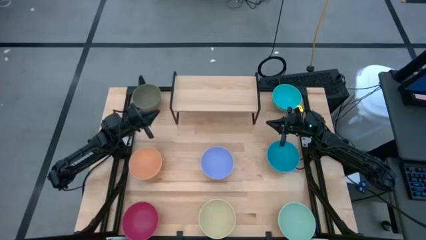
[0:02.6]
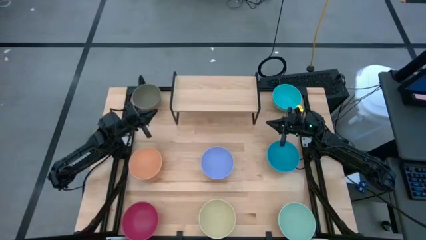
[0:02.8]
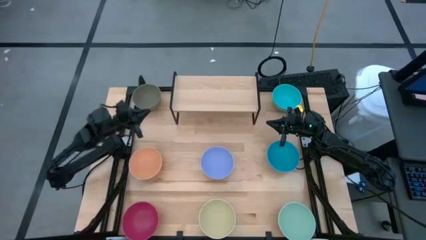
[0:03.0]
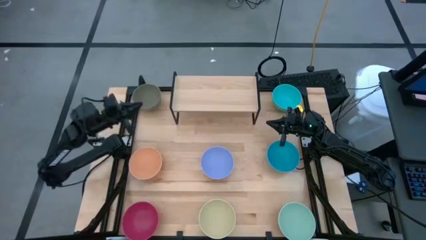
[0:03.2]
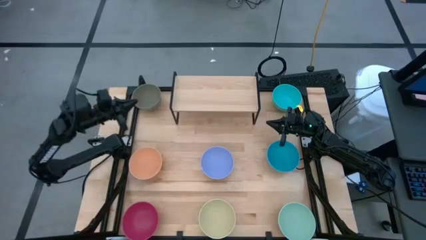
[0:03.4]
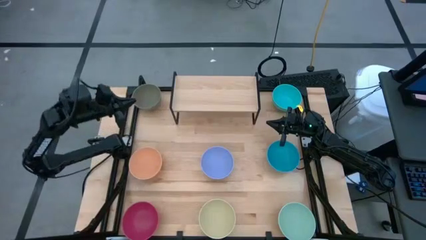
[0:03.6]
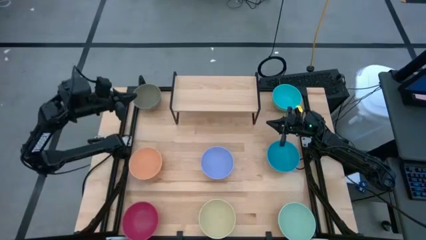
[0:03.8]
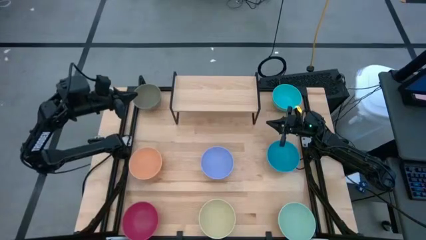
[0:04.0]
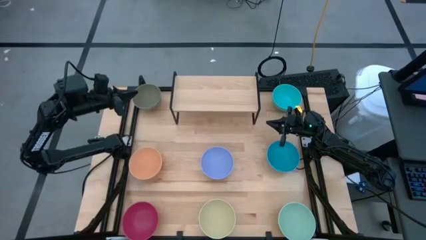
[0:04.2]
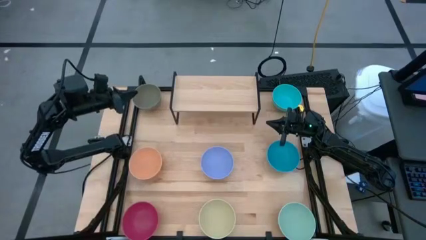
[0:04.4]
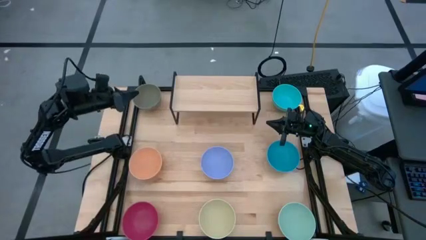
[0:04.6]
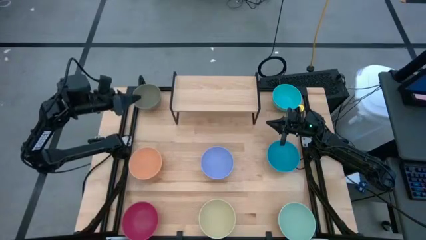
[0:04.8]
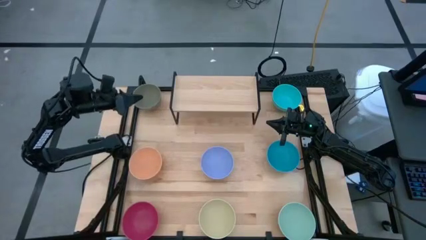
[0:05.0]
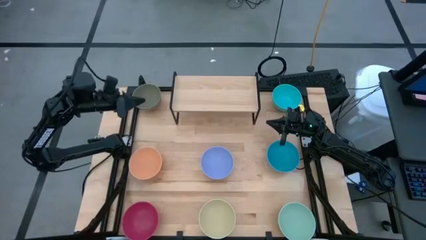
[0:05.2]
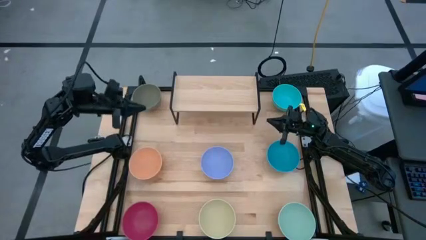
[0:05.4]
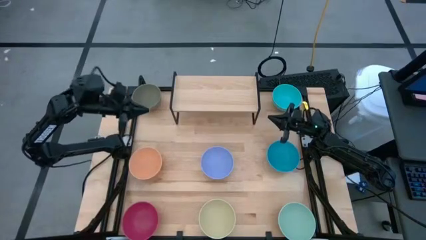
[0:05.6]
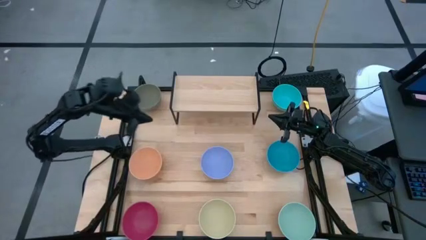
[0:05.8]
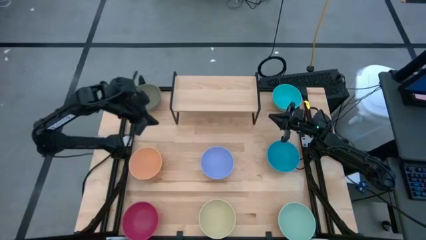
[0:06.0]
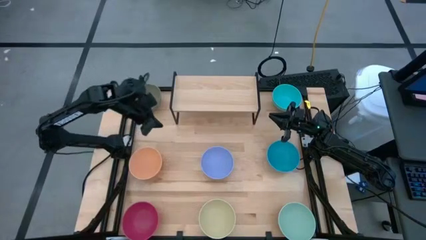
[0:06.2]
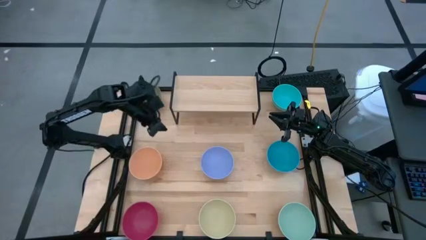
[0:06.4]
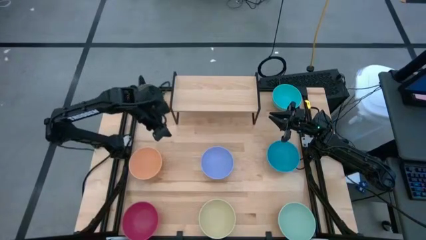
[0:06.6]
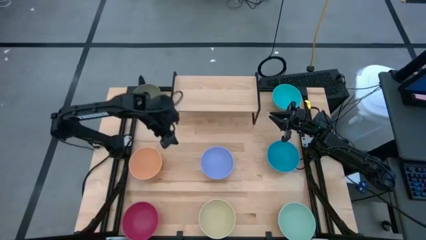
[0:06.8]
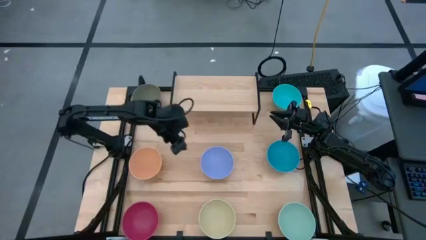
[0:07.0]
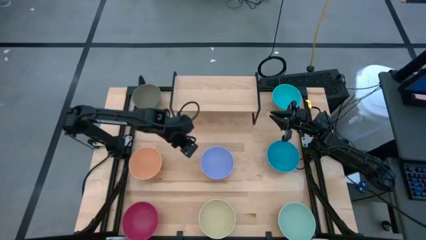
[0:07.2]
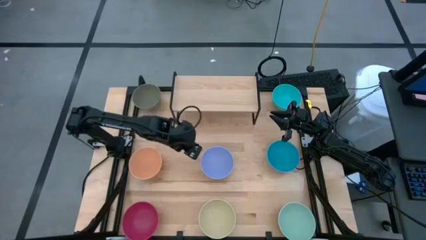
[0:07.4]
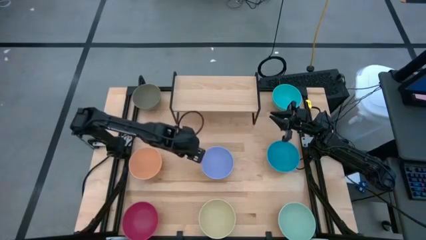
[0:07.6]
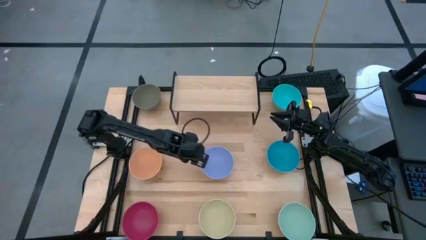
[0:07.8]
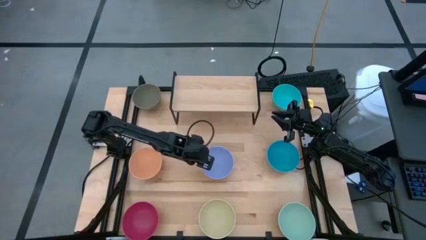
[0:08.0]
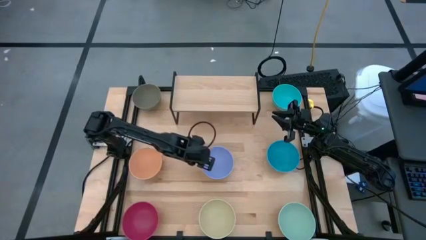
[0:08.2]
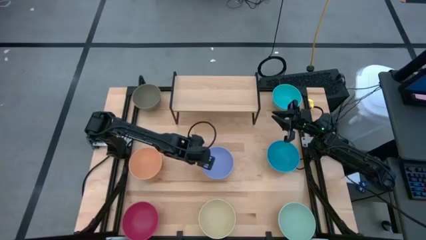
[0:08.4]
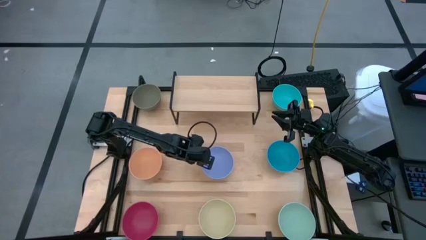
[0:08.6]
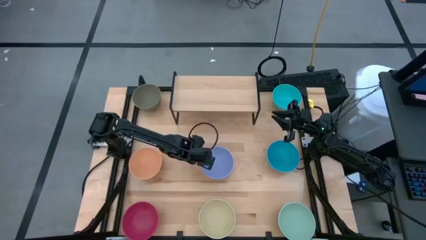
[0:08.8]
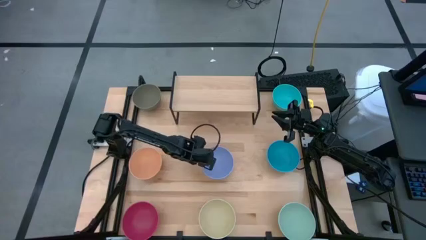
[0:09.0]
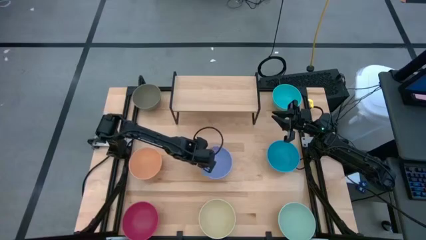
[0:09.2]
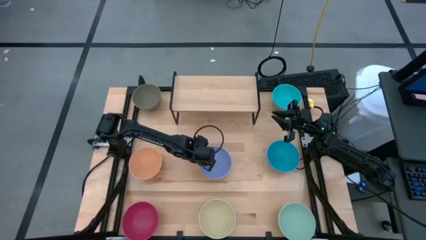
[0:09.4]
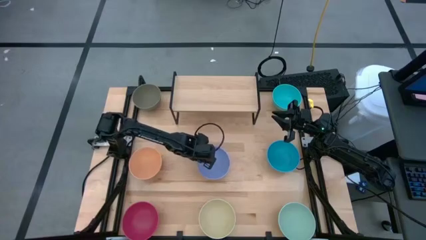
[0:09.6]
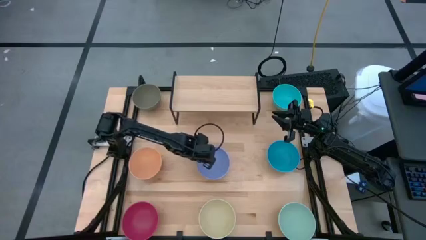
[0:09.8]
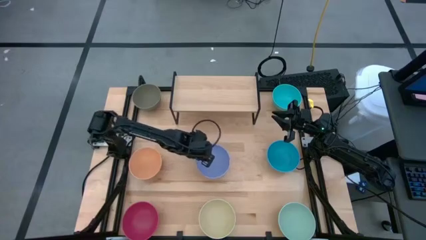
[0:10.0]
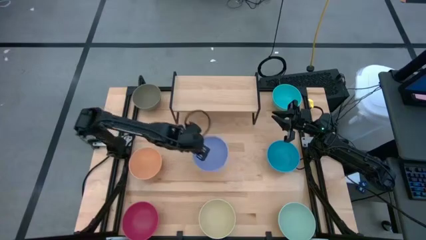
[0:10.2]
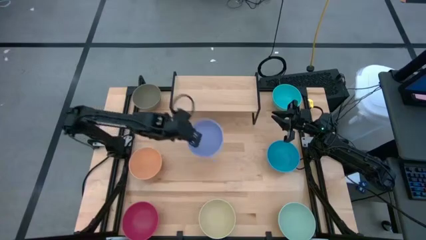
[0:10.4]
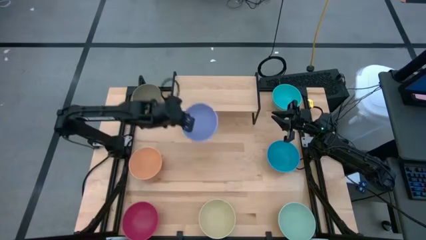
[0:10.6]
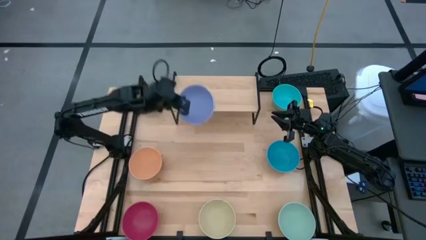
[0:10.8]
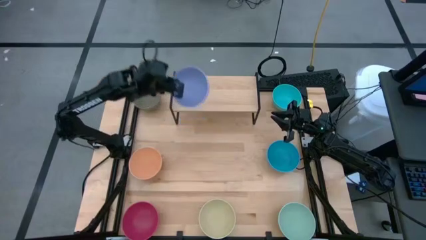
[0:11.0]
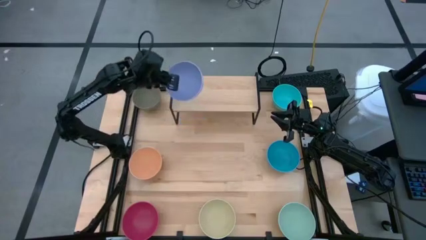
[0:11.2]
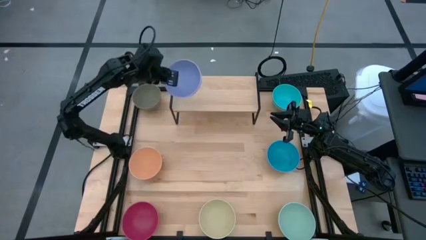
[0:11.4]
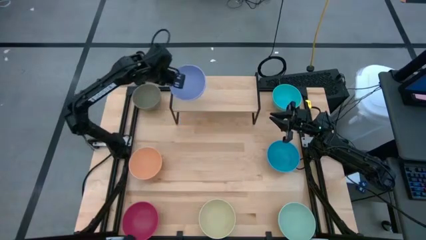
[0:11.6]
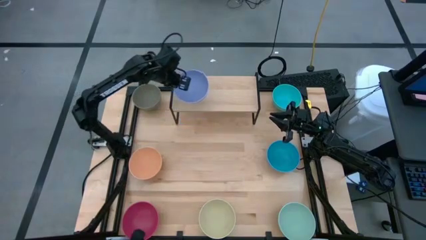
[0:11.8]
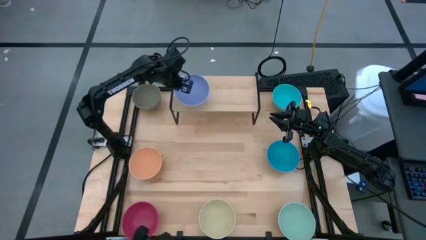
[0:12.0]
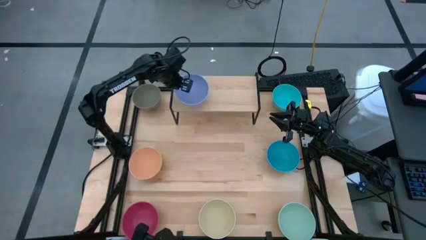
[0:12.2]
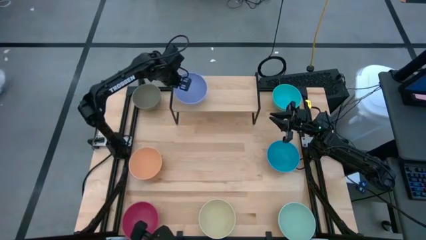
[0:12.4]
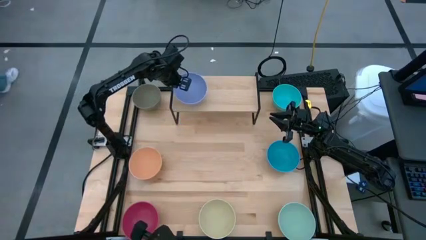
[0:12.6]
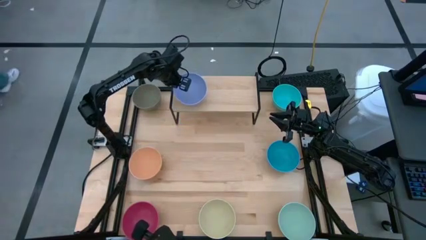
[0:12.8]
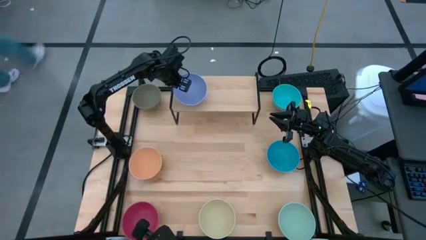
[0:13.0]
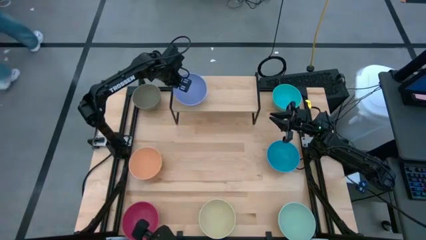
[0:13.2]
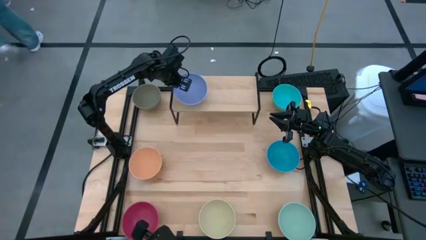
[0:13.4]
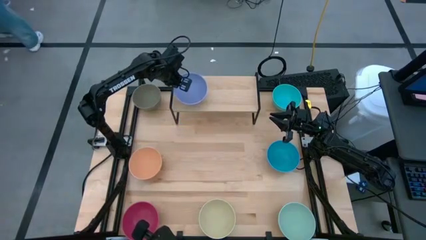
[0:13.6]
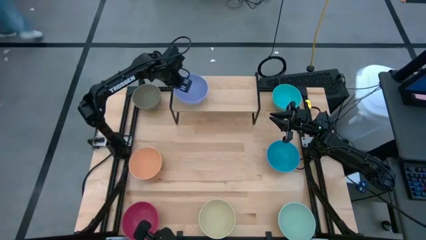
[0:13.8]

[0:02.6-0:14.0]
Task: Place and stack bowls onto a shelf
Put the purple bowl on the shelf
